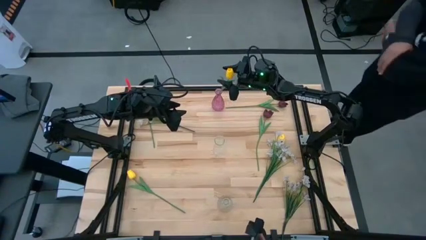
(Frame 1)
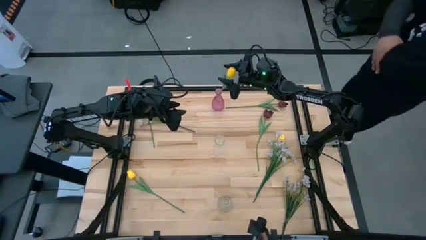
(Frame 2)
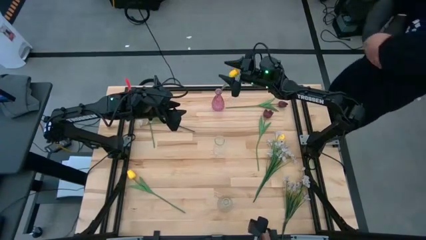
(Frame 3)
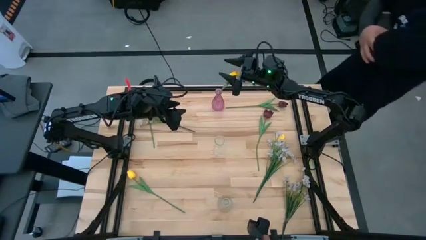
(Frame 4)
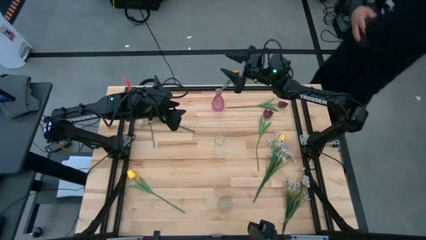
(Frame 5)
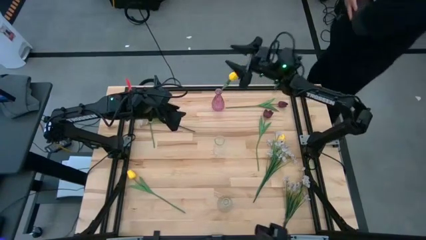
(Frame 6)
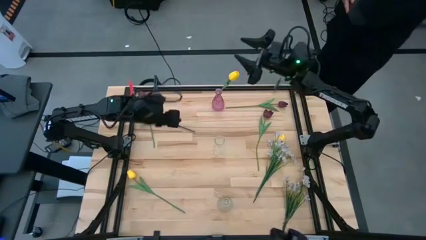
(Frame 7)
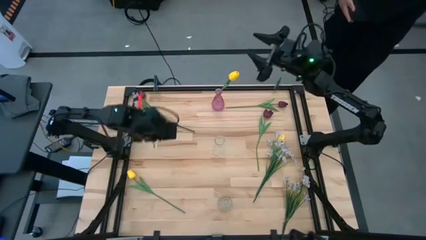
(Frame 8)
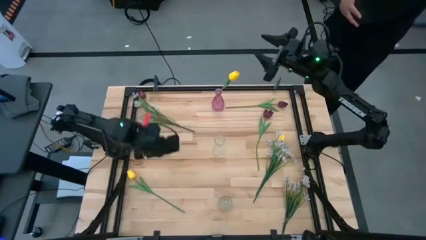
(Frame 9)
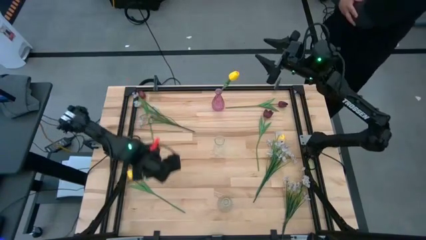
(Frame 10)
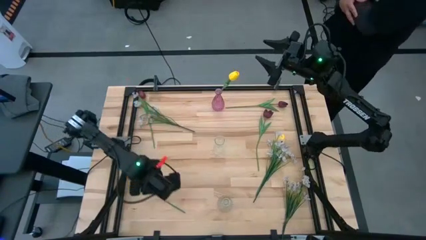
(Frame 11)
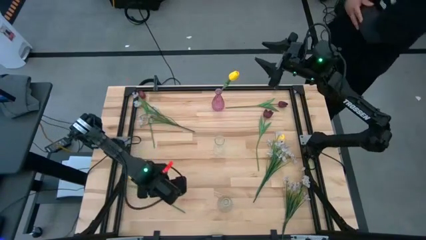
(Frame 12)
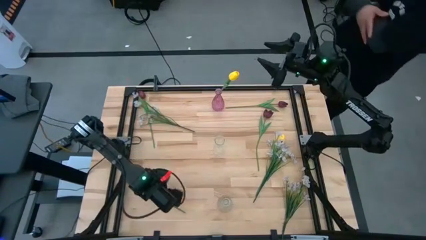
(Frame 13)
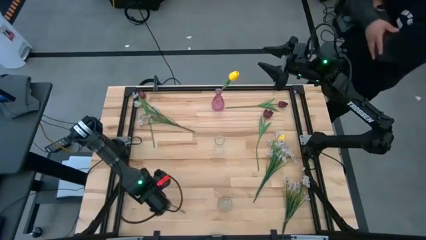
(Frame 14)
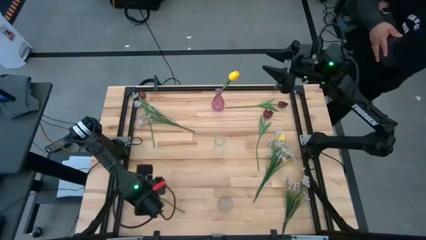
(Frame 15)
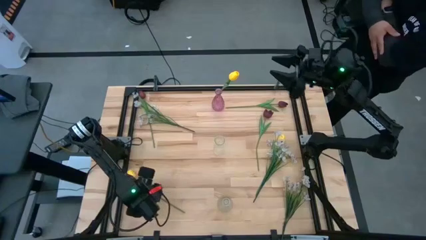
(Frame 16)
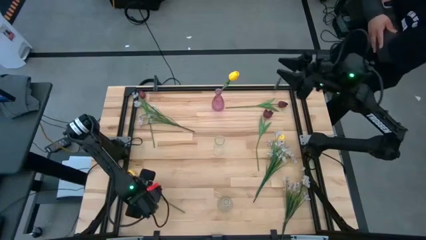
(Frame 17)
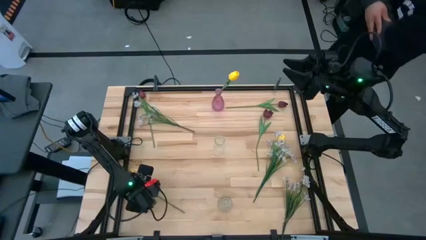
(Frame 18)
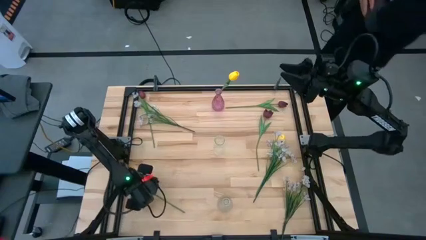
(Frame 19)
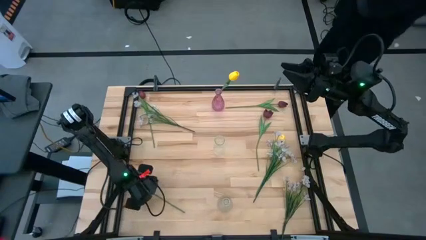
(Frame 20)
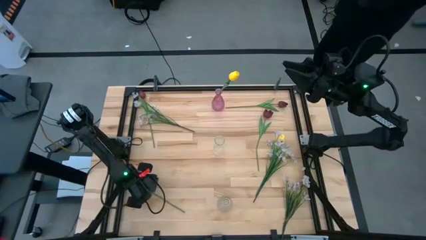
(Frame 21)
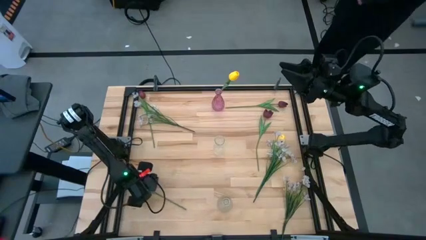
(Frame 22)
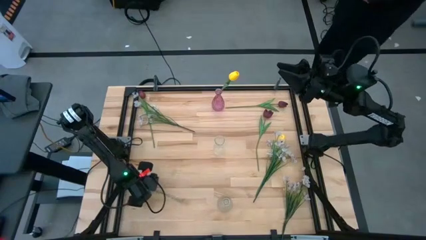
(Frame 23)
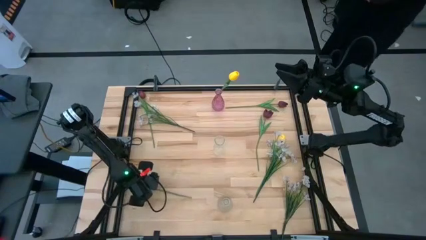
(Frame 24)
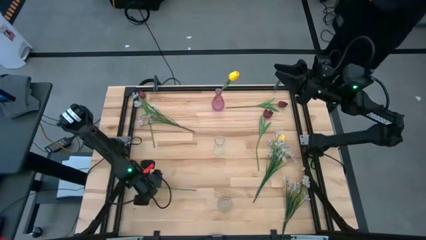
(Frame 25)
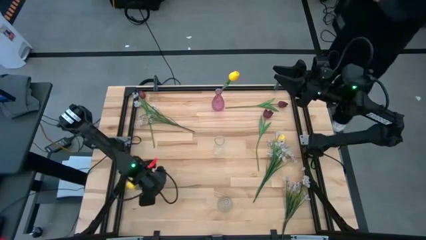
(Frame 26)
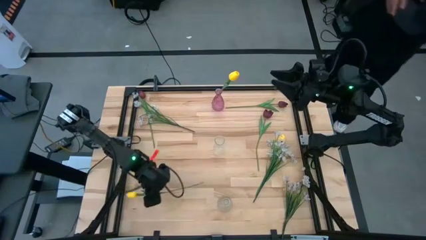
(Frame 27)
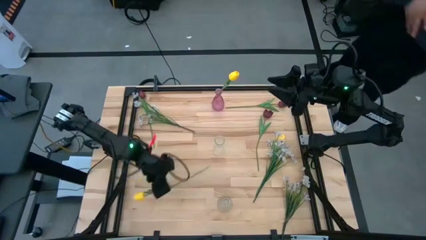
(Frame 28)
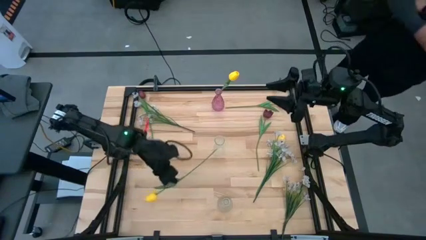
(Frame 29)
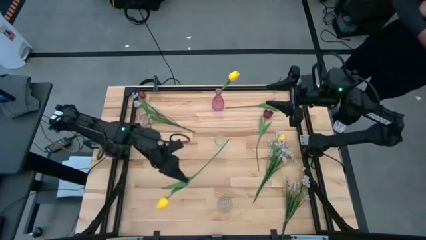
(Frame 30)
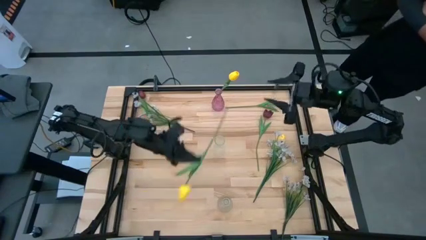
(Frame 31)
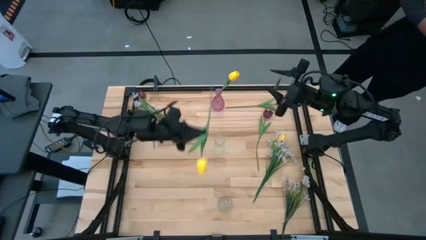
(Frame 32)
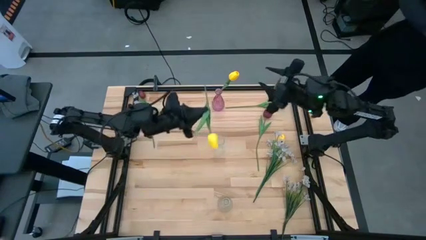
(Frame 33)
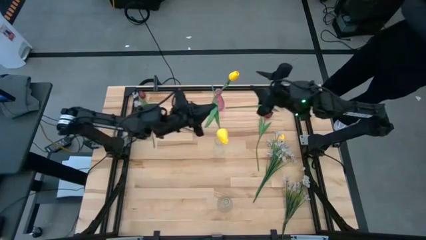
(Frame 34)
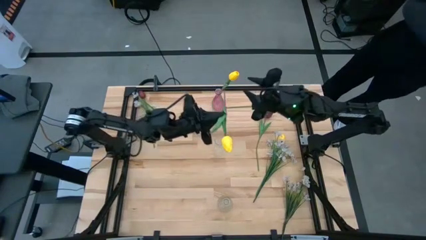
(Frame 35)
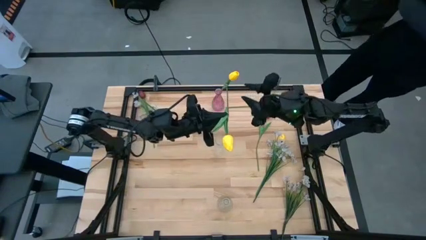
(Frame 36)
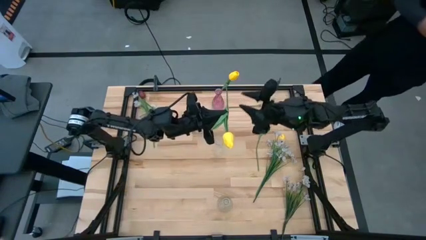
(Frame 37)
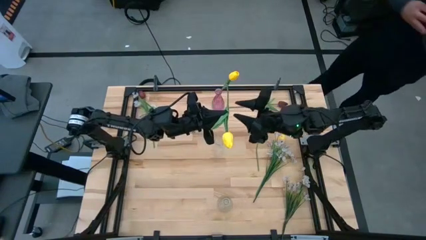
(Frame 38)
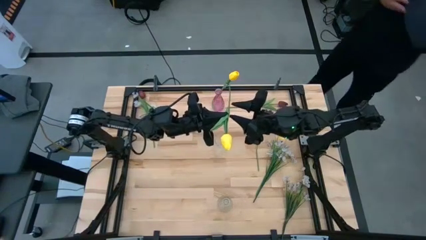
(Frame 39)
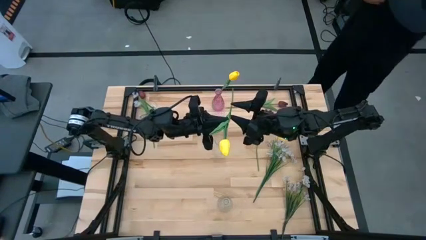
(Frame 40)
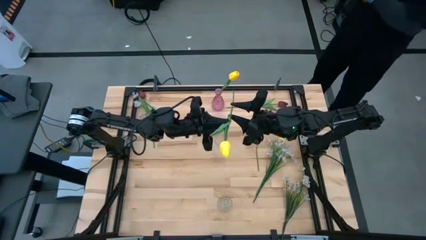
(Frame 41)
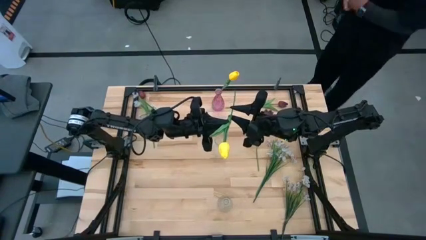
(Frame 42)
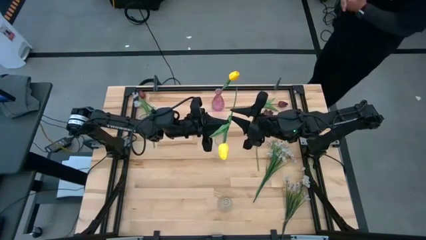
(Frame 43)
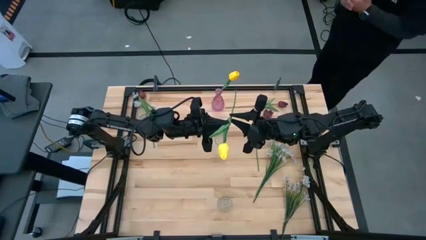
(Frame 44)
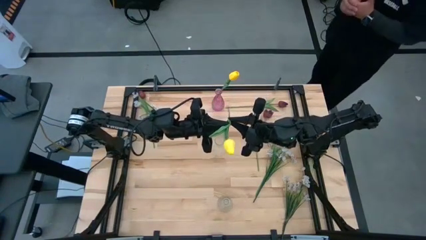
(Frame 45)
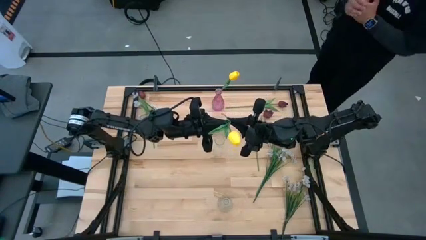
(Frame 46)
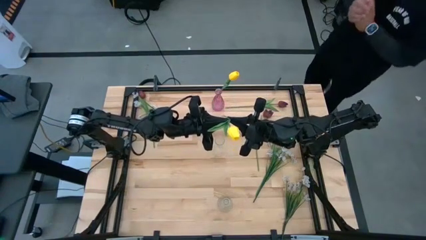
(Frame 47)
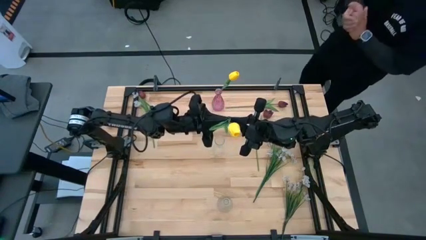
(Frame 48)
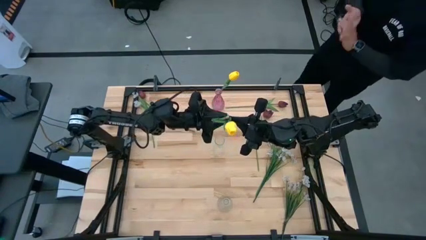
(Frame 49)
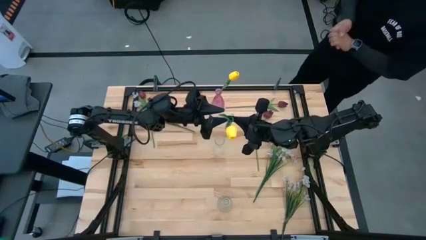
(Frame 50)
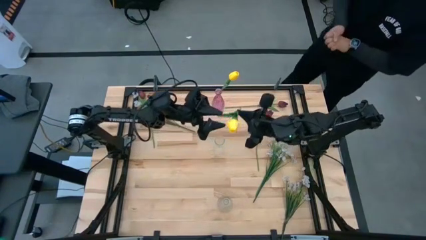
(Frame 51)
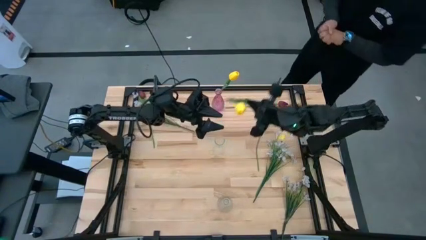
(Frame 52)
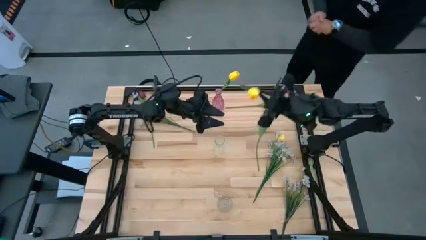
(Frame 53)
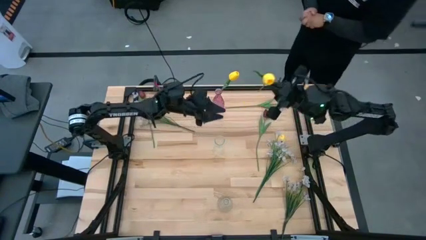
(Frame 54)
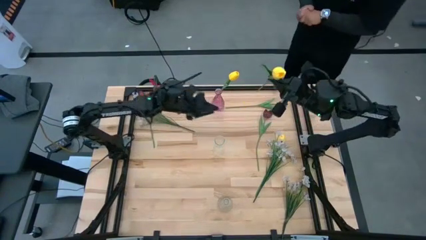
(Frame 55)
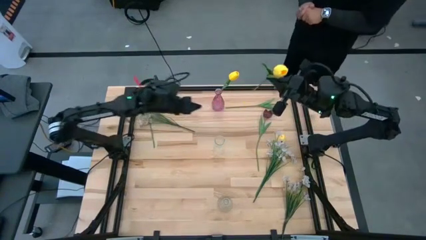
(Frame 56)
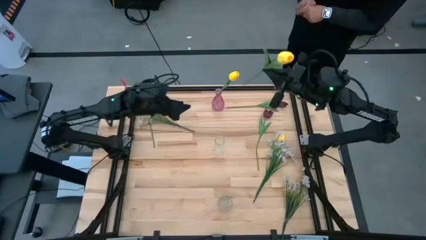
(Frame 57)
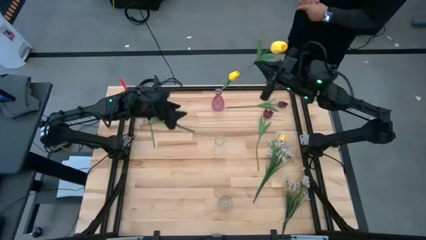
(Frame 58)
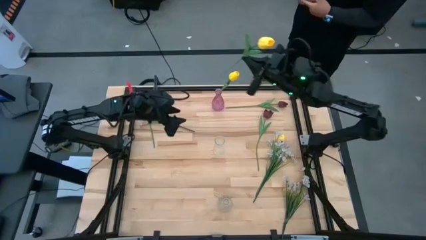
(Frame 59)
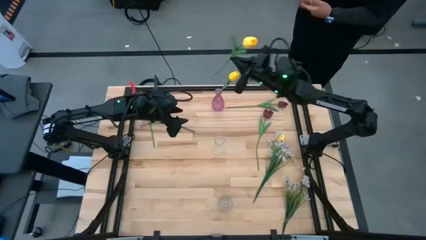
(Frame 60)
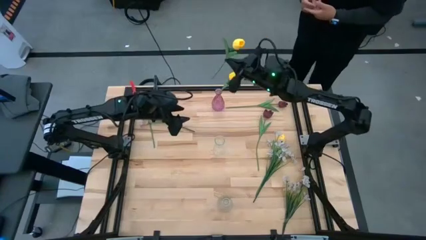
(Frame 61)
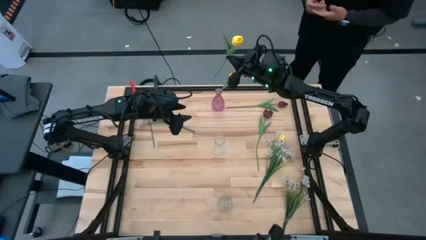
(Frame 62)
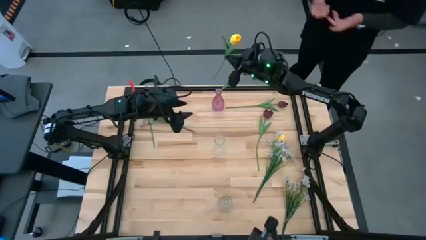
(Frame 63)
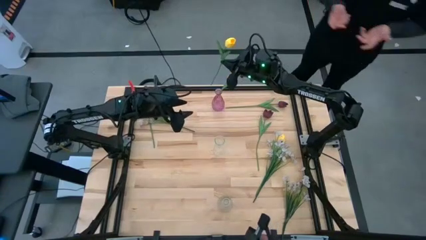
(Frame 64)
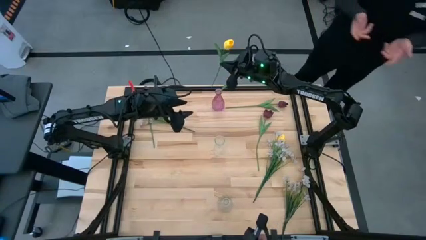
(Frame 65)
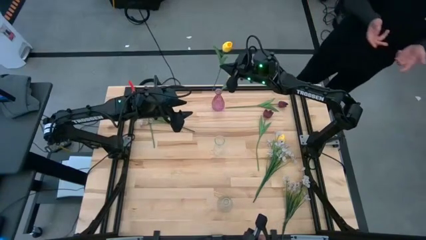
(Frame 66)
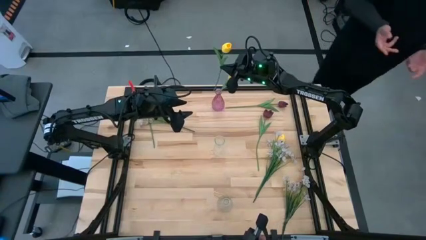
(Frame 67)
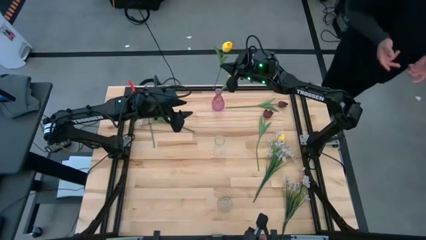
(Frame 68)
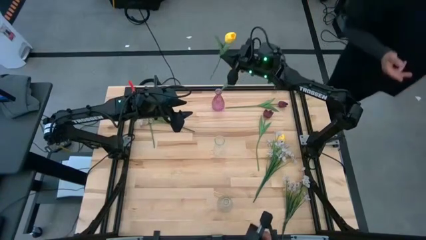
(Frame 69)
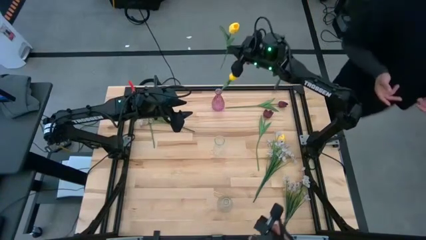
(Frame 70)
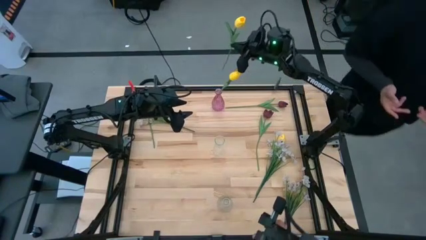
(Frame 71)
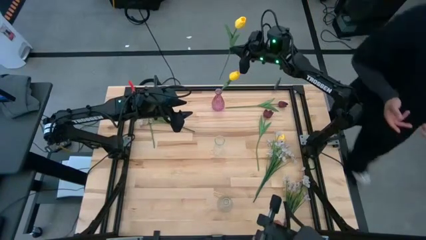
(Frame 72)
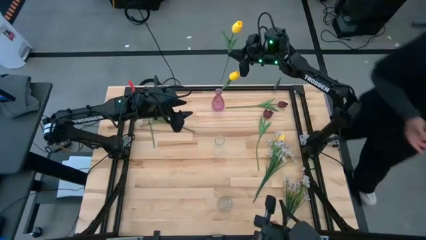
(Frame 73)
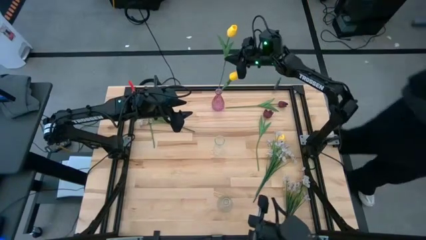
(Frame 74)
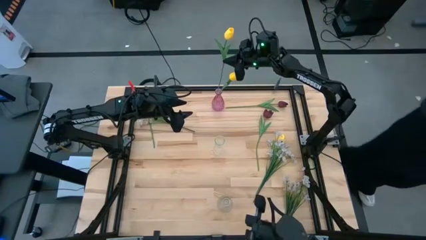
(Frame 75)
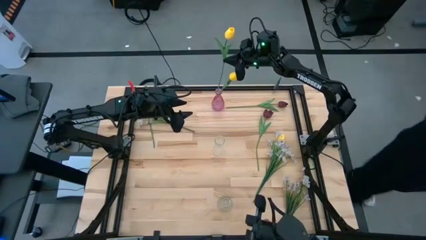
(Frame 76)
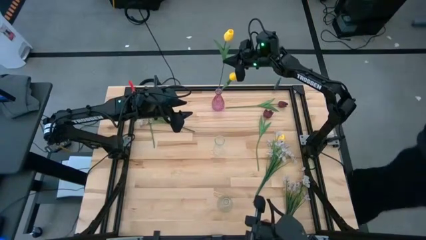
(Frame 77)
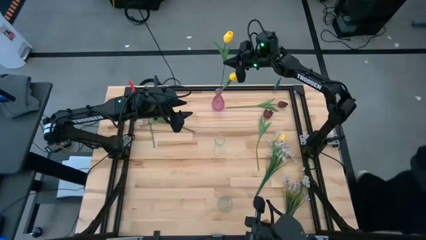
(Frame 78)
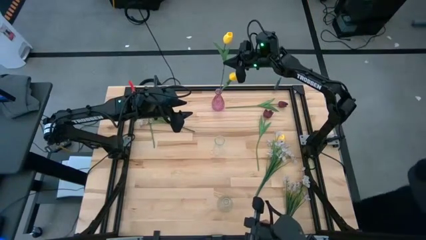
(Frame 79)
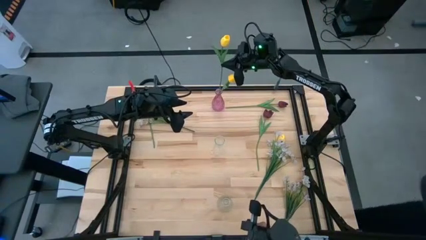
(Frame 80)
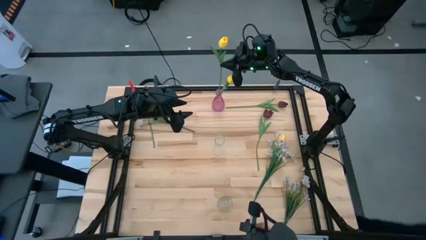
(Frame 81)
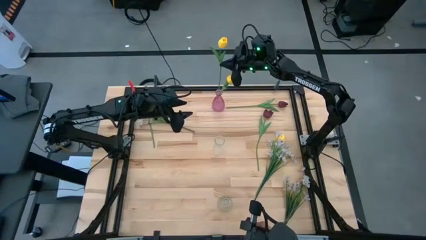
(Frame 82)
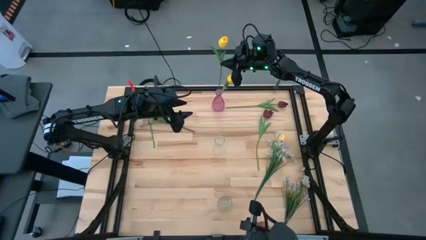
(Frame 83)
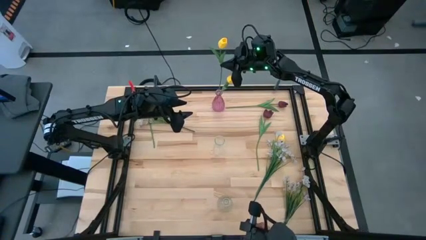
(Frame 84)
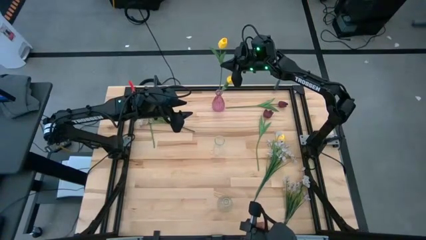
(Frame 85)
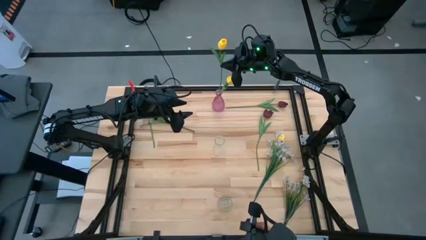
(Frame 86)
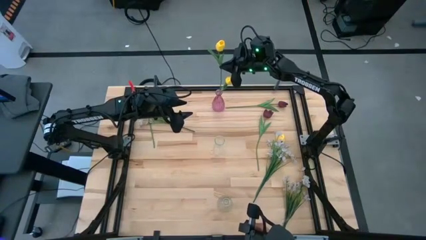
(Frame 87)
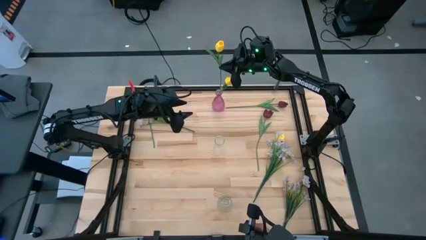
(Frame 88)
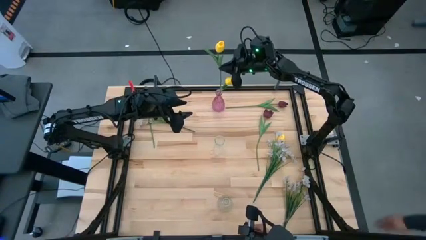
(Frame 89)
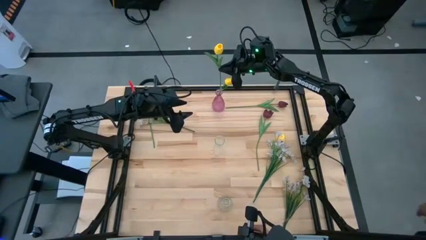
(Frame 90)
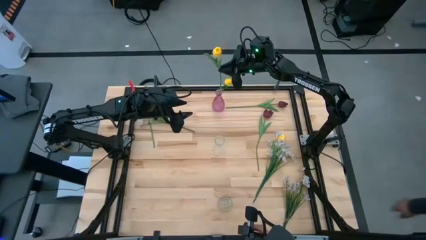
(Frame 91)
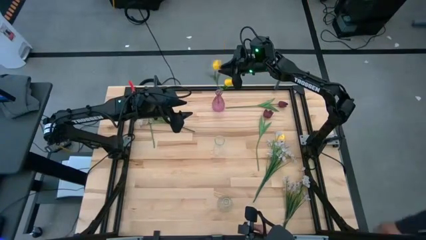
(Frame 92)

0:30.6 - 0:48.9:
Task: Sort flowers into vase by color
Put the yellow flower into the pink transparent vase
